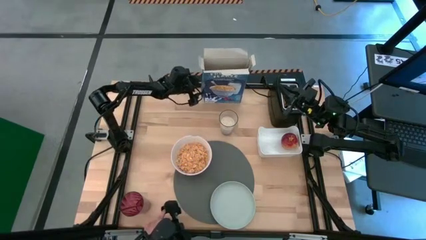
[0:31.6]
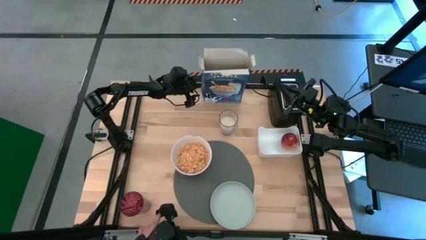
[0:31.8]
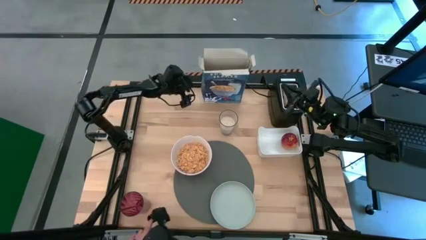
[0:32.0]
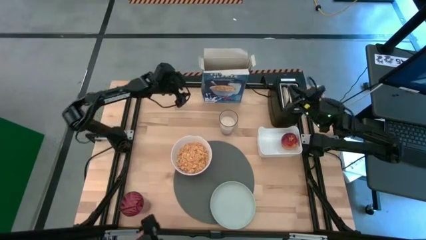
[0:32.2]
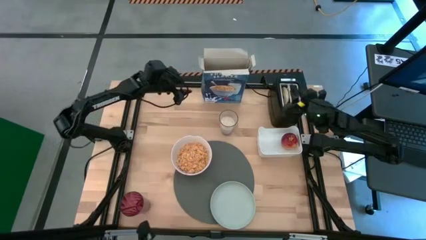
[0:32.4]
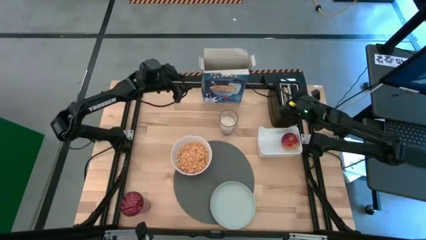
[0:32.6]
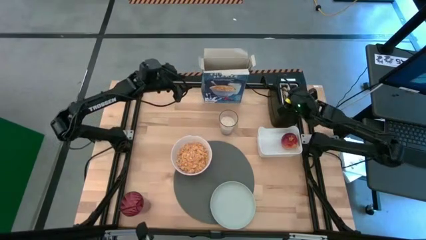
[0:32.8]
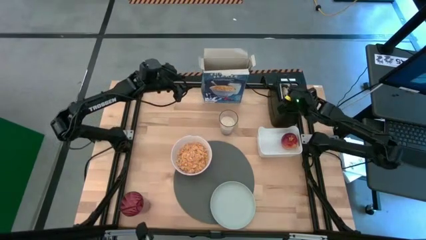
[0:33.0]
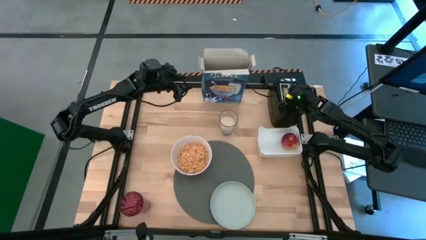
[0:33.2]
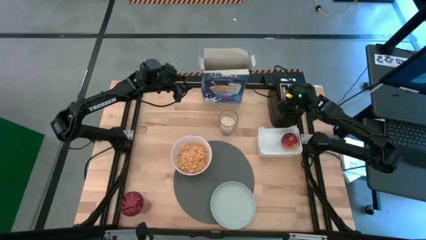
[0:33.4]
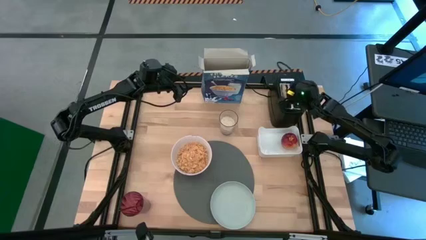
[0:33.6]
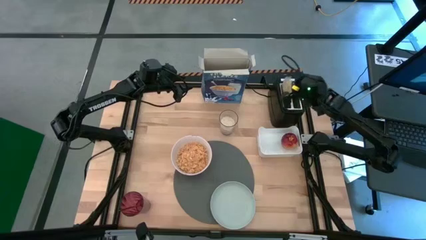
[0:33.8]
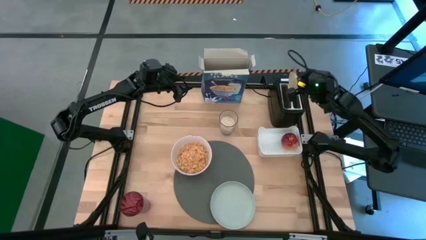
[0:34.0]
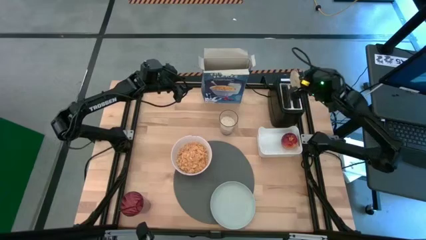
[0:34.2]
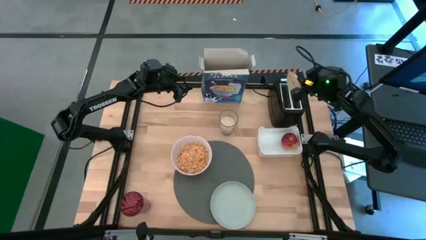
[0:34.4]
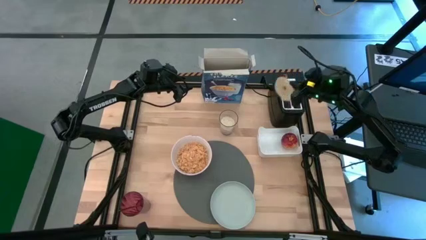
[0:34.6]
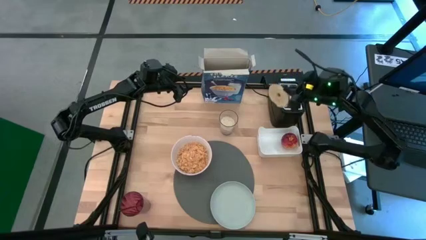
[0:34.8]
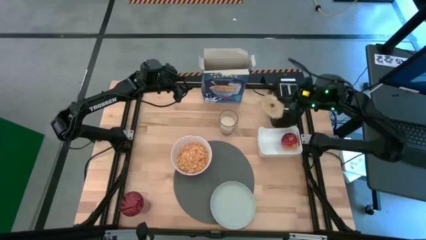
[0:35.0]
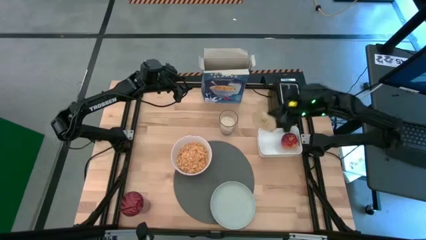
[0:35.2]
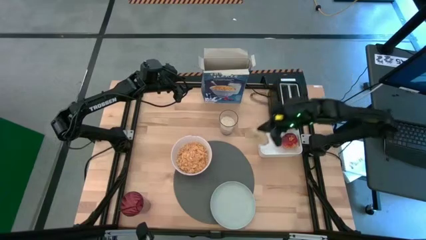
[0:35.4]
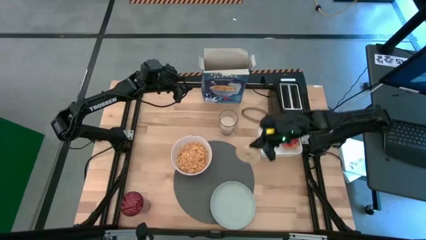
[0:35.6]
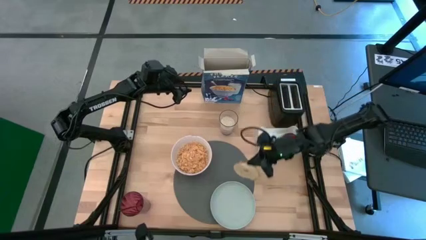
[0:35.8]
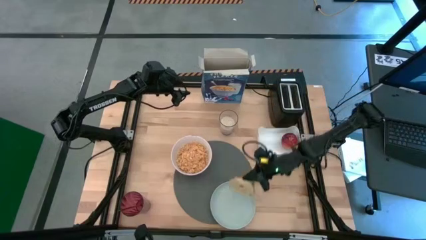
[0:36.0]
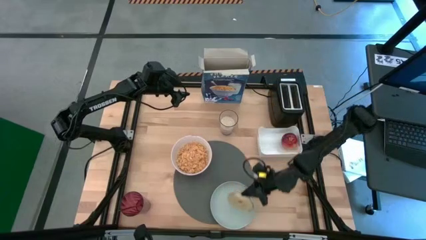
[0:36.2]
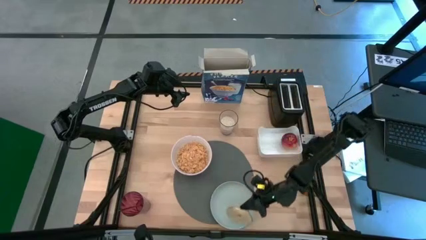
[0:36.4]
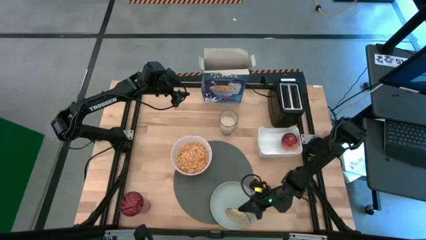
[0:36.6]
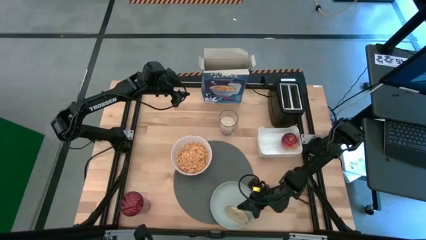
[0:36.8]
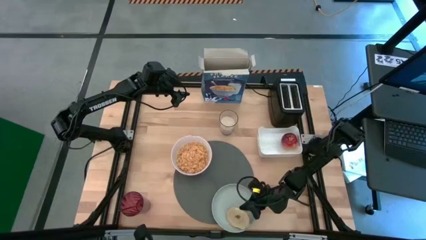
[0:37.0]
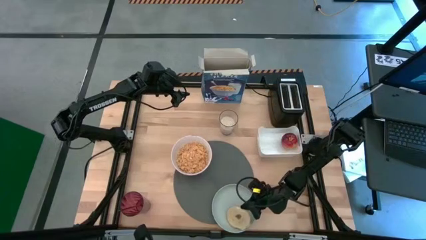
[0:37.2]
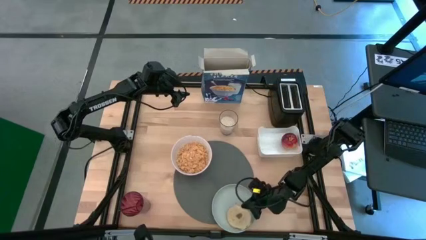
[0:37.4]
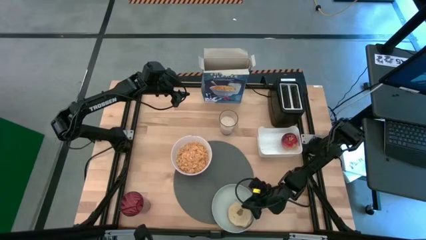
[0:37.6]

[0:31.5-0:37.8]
Task: Arrange a breakfast setting
Put the bread on the gray plate

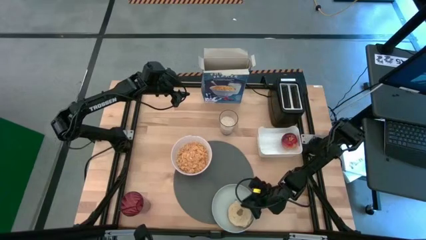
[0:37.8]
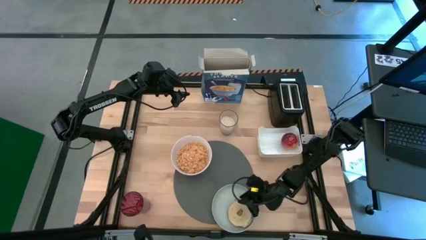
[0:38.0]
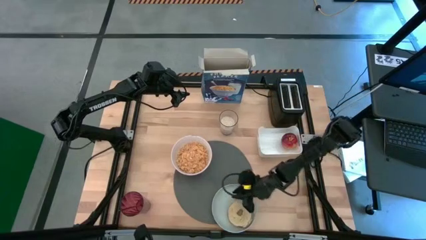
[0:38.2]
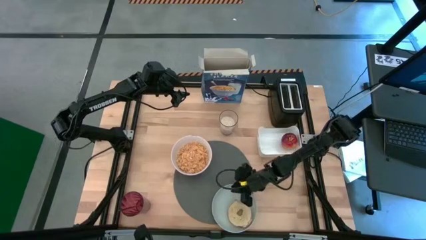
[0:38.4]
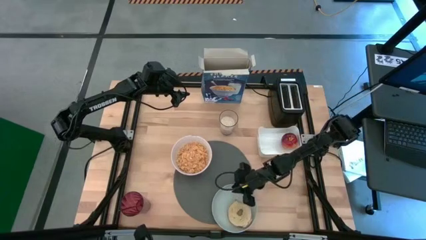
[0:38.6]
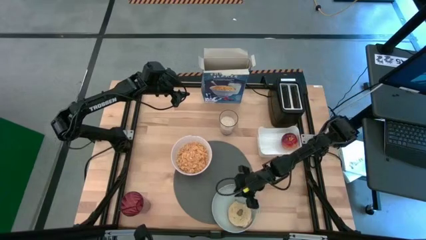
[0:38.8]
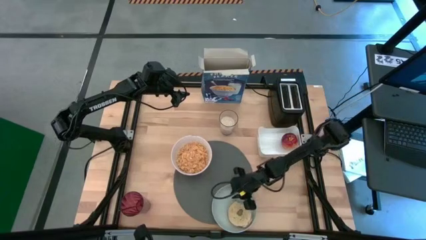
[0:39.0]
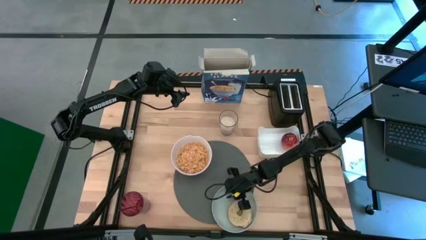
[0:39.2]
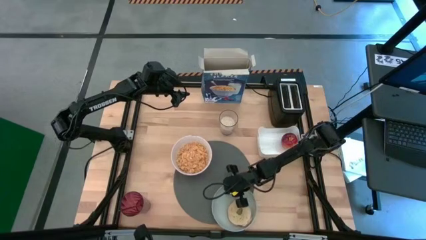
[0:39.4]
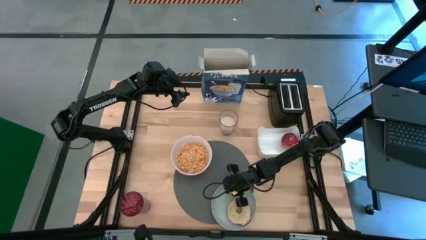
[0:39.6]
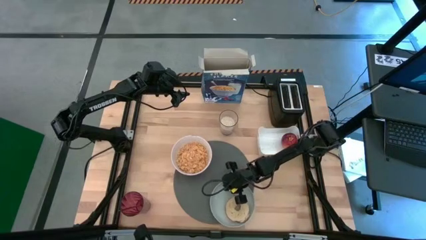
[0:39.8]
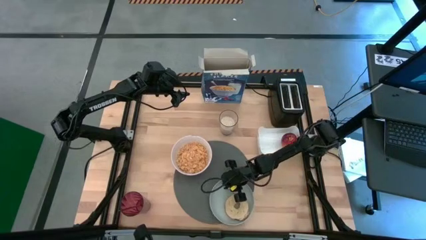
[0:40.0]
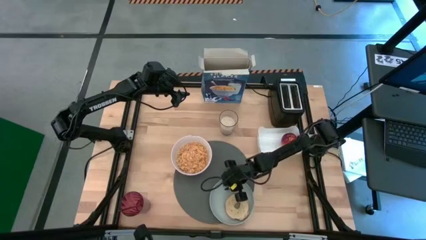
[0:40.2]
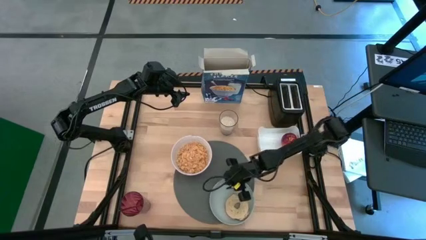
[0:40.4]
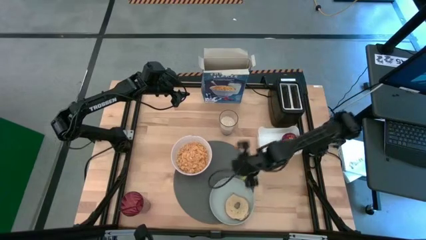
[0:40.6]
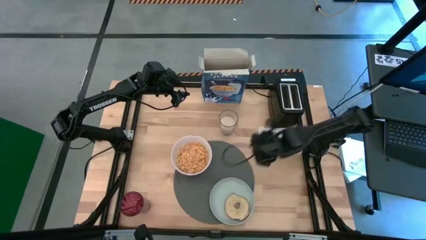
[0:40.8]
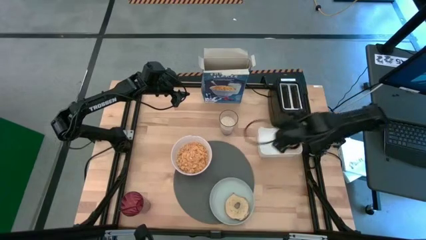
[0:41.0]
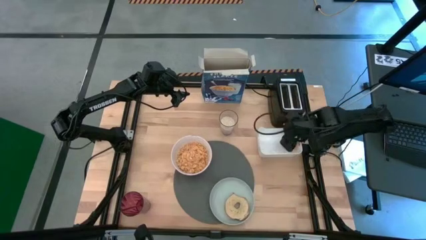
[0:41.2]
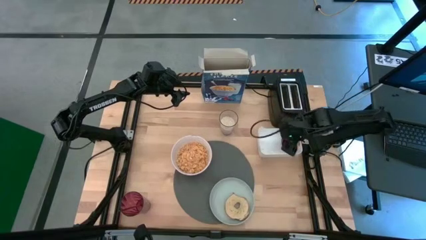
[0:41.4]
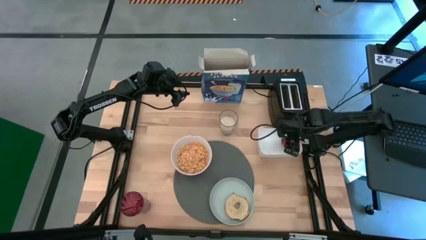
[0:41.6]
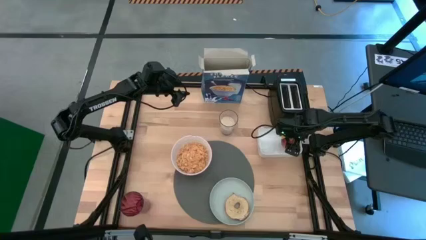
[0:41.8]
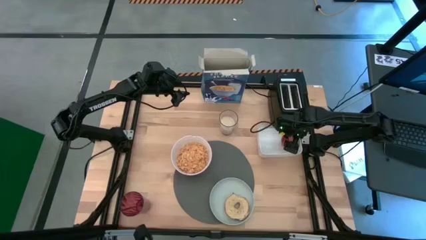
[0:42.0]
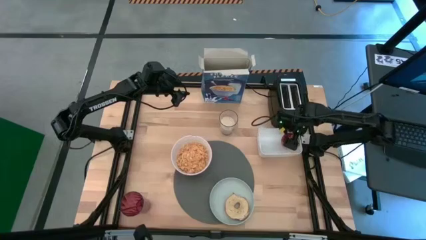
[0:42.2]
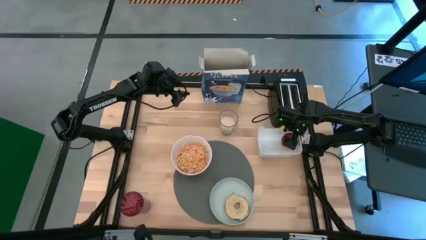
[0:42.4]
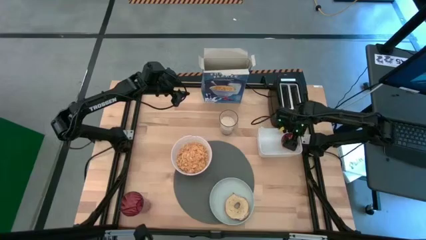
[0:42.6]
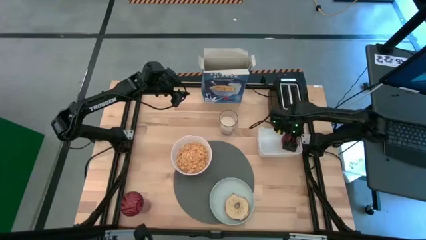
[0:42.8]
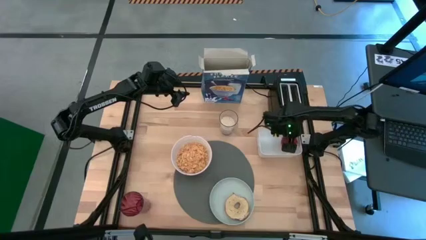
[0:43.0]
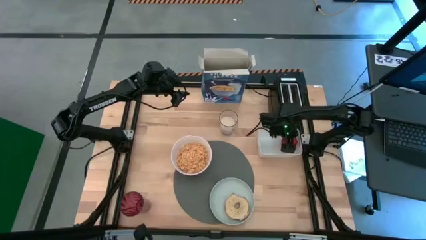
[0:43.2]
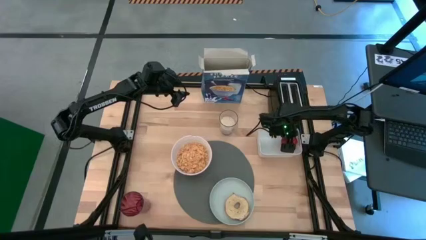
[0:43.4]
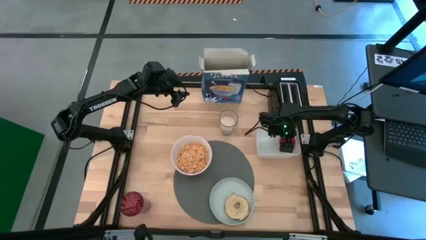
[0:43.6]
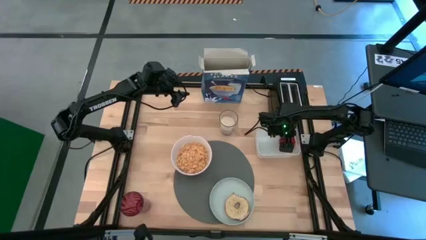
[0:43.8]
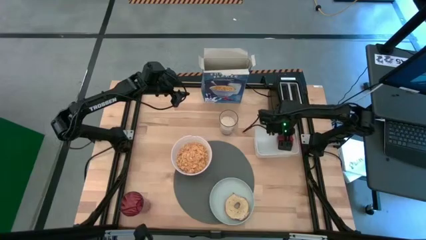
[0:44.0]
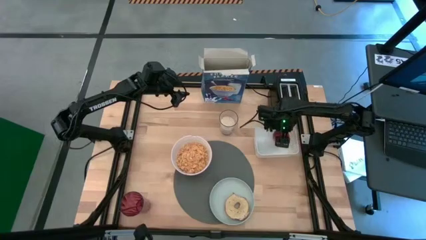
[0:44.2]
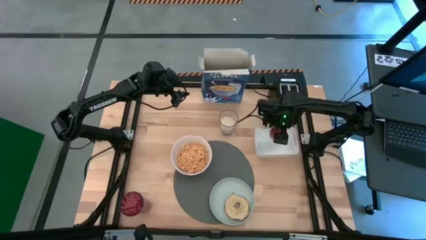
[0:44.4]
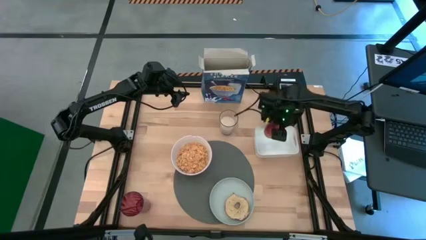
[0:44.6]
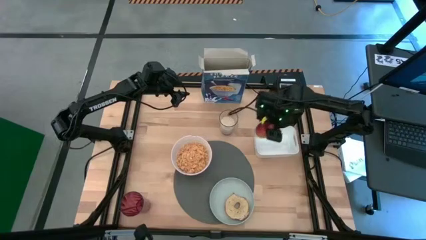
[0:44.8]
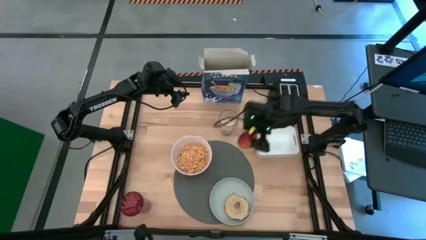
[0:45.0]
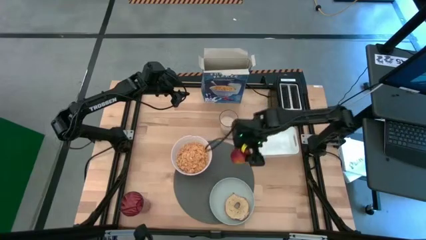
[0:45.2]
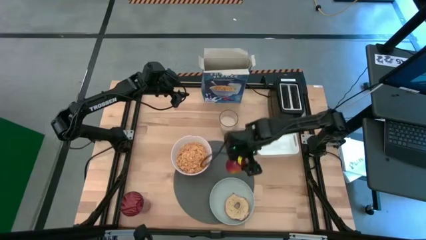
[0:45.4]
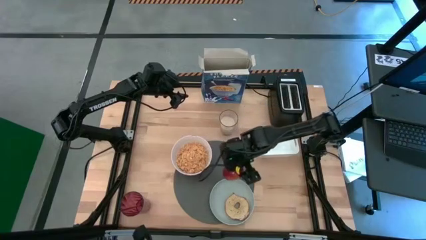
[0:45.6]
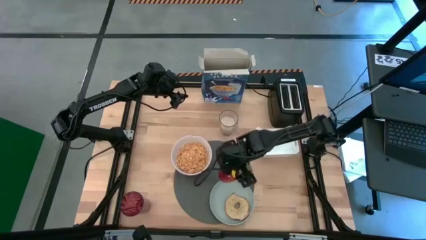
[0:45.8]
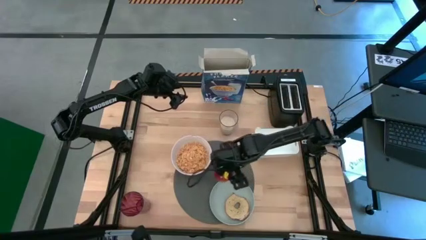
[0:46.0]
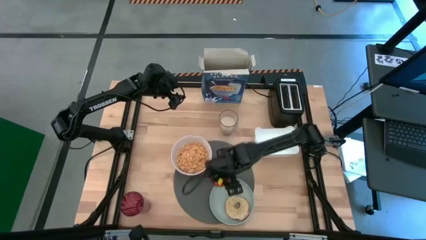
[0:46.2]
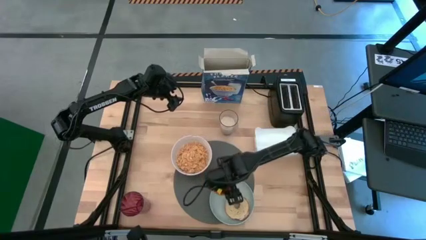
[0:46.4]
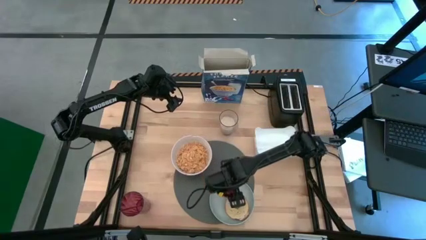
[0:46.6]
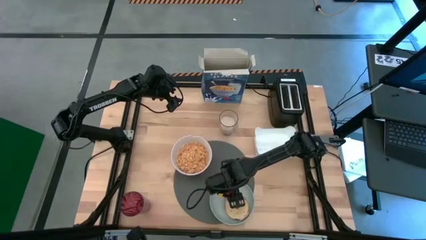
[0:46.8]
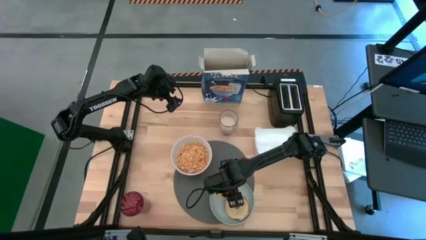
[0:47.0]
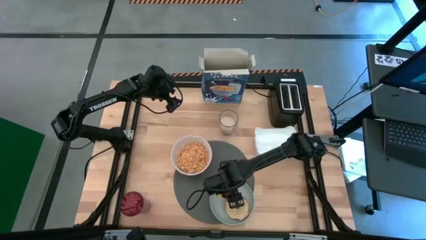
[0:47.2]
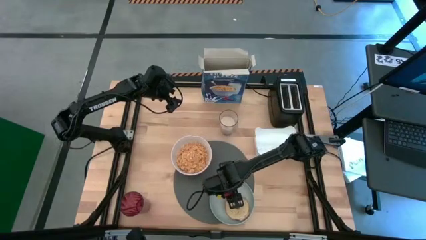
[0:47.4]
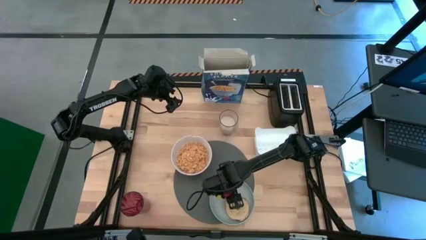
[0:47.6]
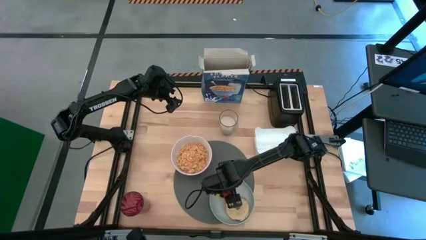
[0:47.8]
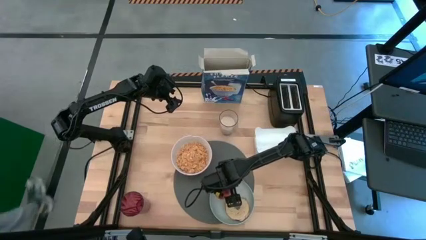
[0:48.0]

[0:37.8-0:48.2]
Put the red apple on the gray plate
